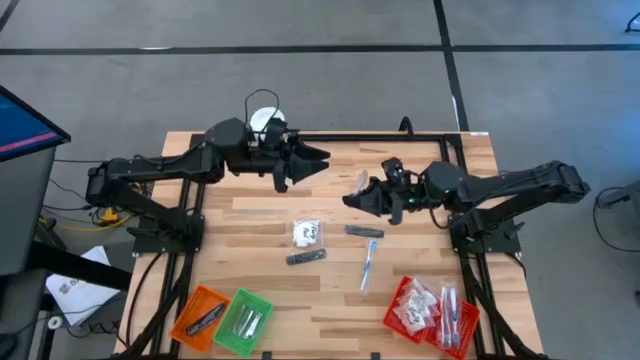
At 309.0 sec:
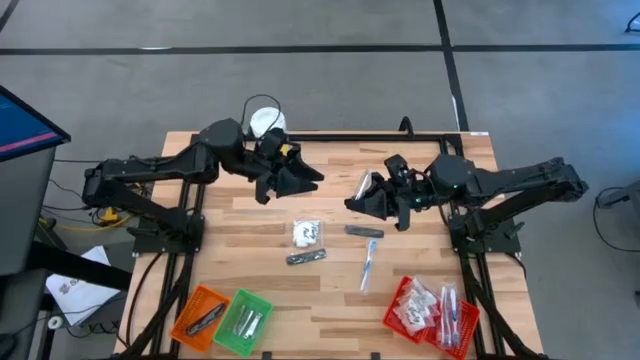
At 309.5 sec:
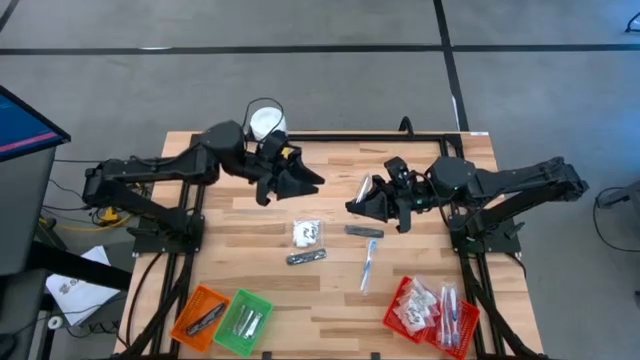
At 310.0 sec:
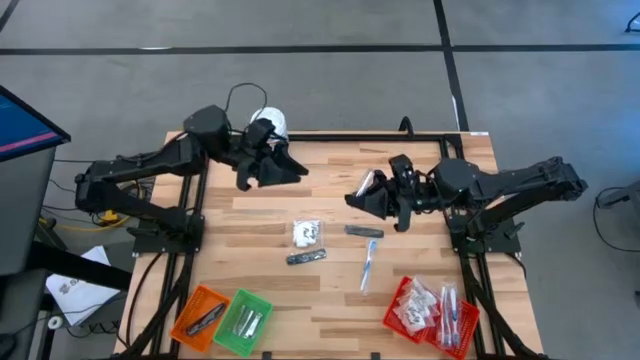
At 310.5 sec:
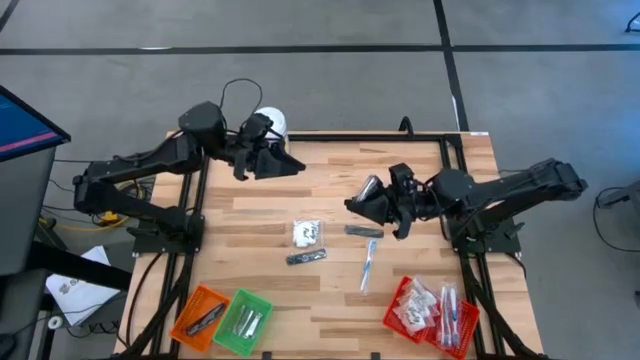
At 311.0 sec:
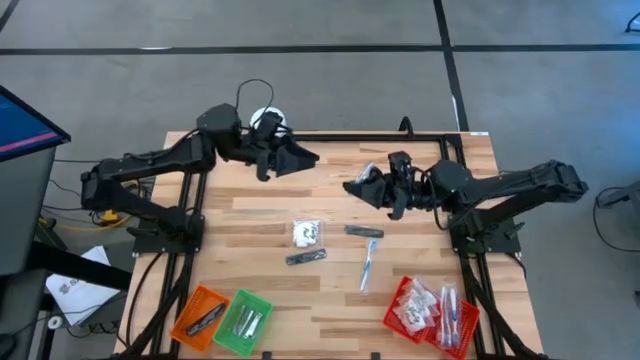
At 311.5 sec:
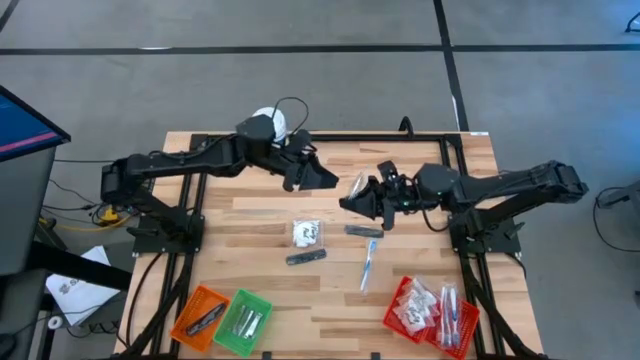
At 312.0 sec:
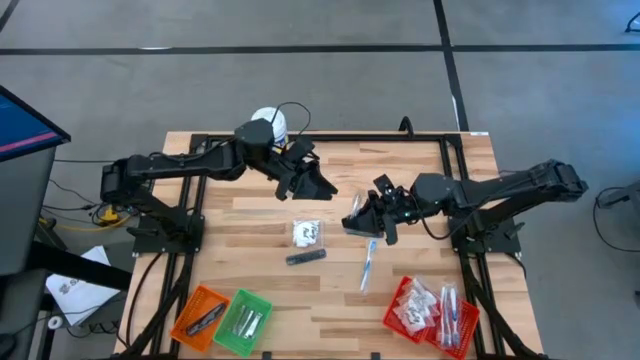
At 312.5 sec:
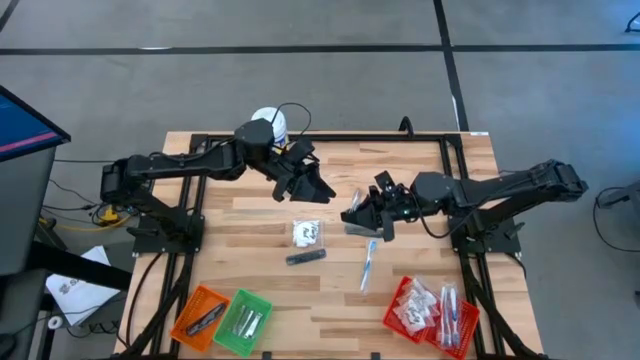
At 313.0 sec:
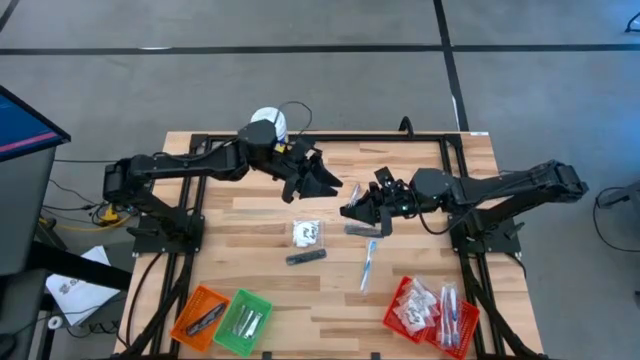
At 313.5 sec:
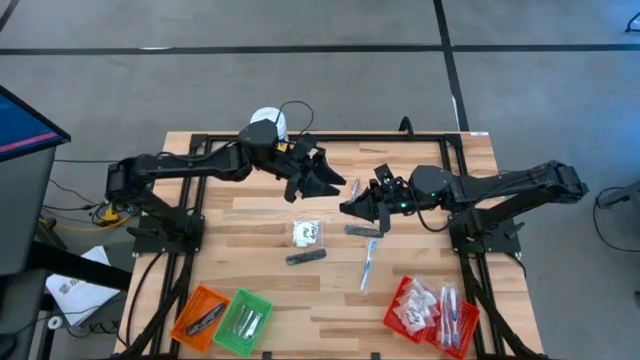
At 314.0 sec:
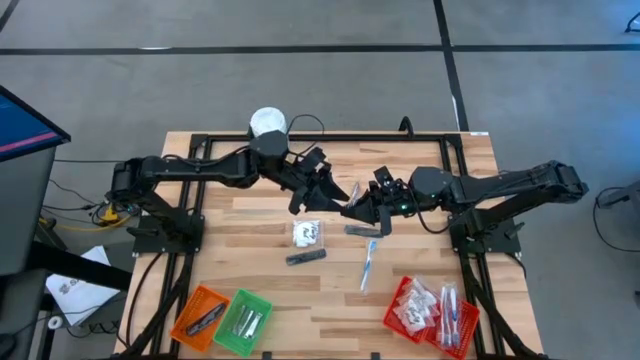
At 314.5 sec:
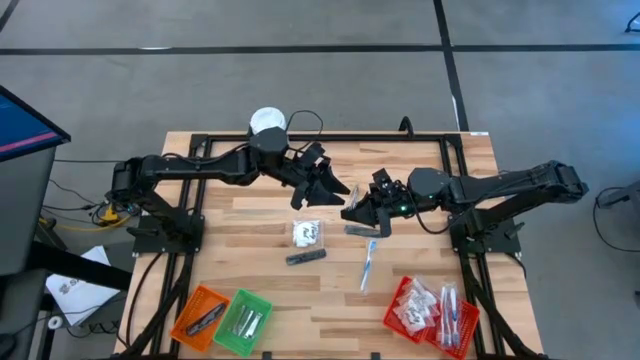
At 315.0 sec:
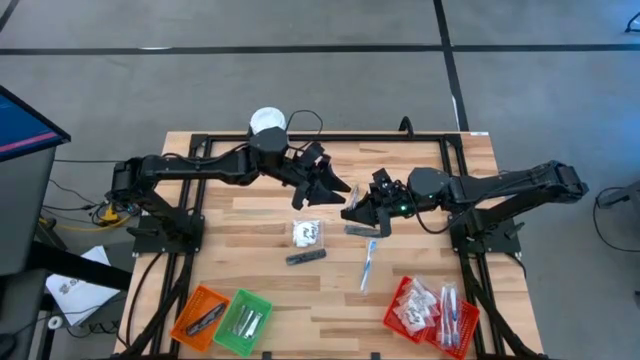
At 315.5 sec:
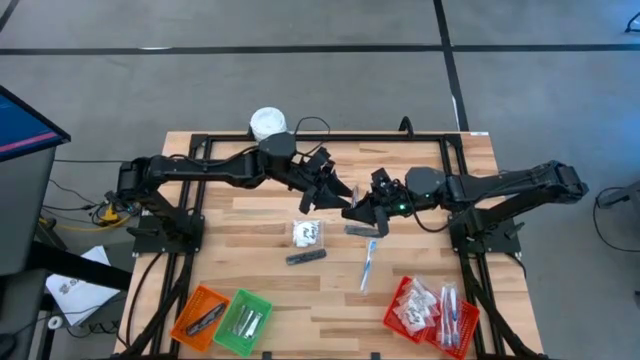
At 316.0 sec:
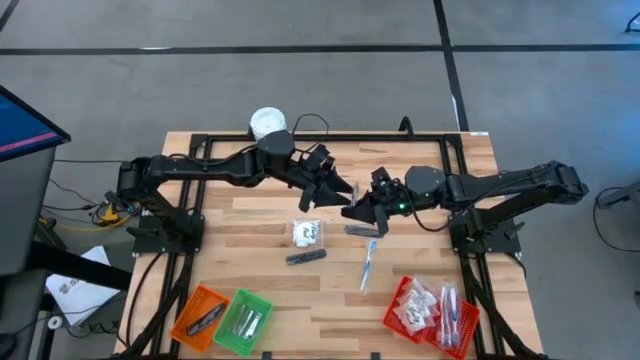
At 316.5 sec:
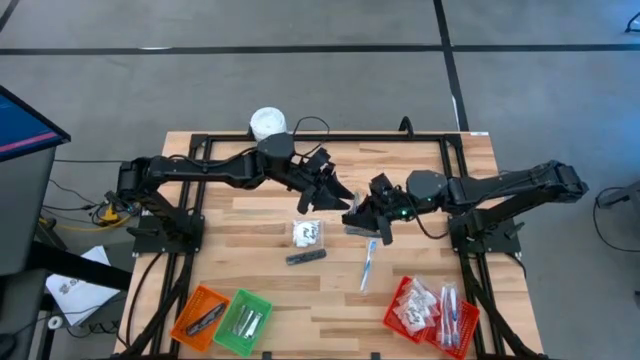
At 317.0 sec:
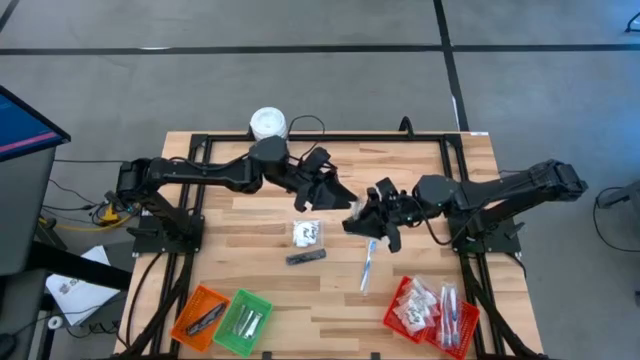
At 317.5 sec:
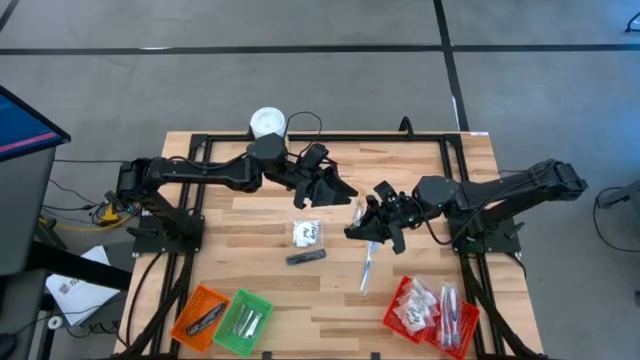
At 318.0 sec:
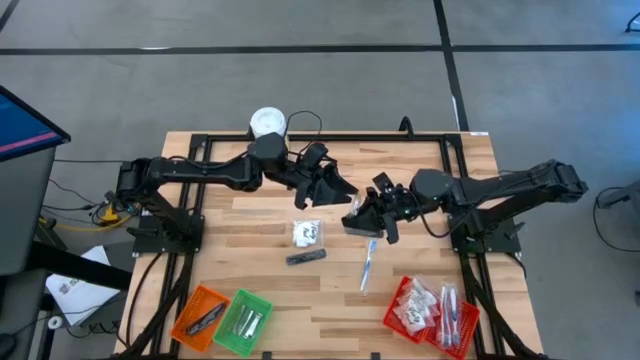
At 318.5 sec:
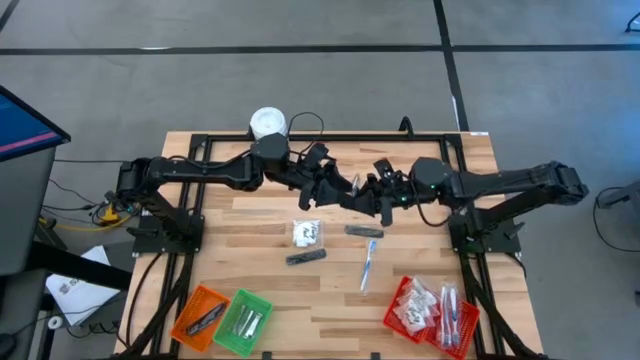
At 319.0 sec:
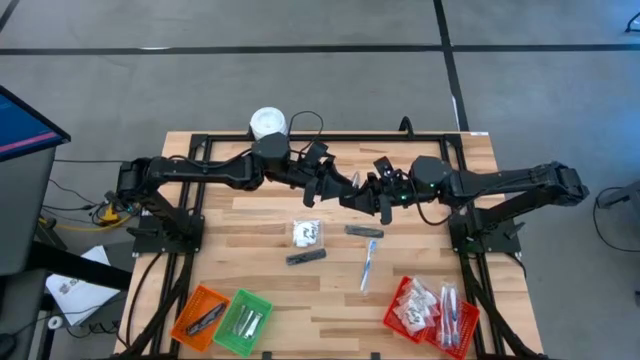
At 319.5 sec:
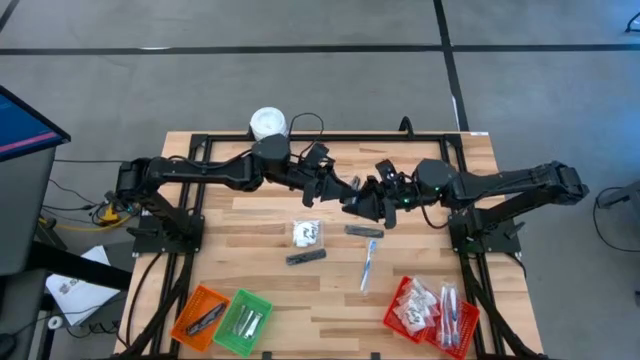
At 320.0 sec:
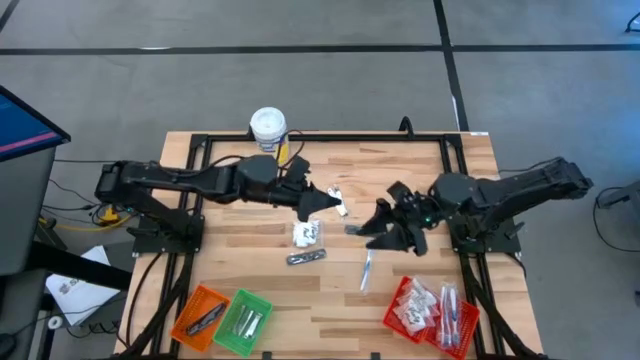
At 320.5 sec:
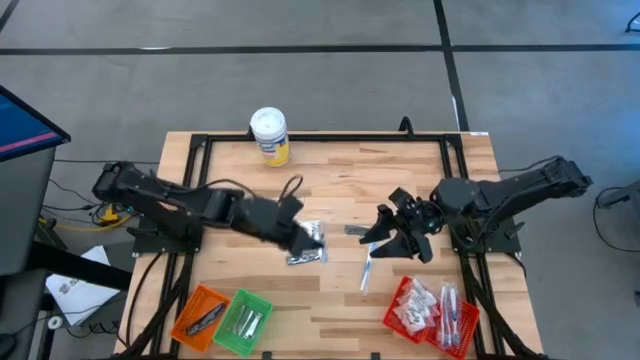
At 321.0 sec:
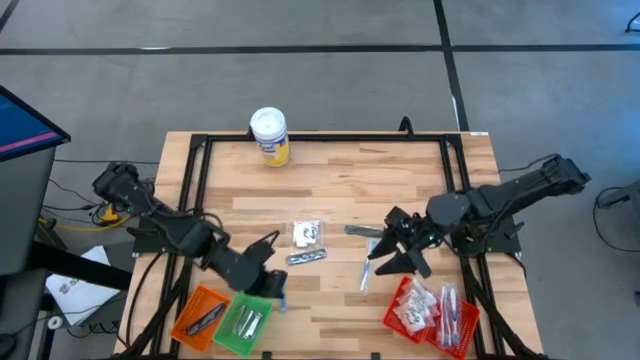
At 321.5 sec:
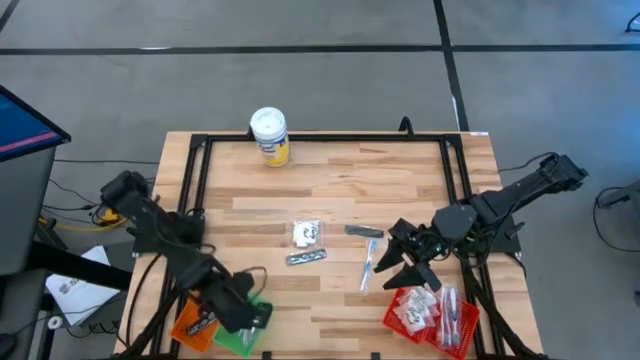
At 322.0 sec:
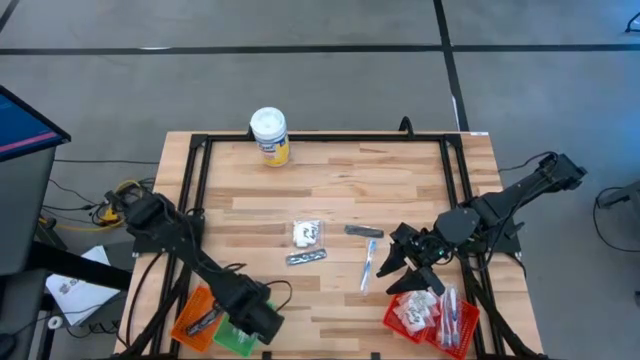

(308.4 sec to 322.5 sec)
Task: Pick & Place Travel size toiletries
Put the nail cutter into the green basket
